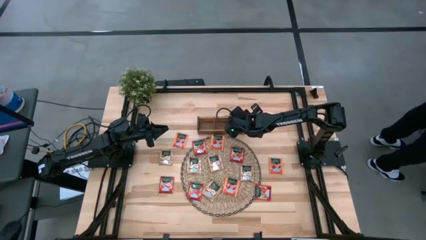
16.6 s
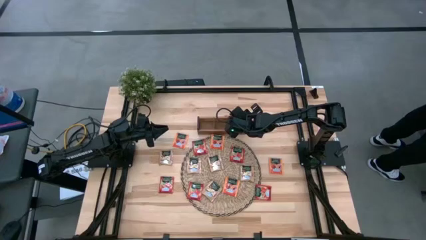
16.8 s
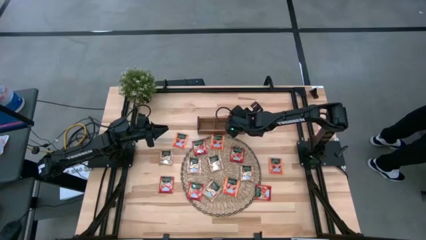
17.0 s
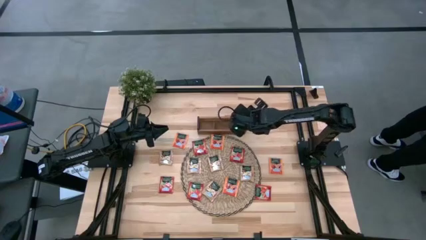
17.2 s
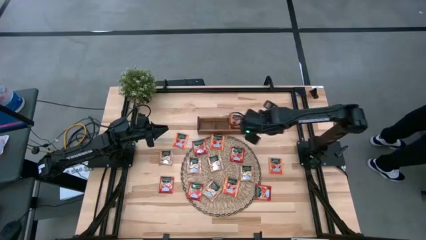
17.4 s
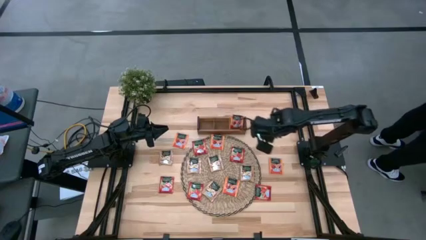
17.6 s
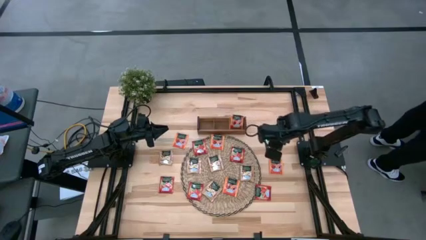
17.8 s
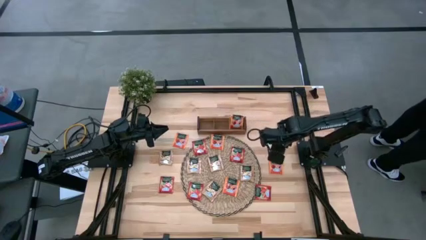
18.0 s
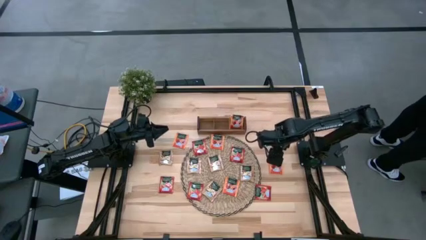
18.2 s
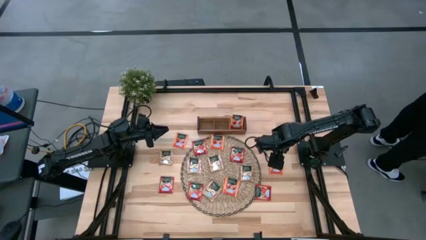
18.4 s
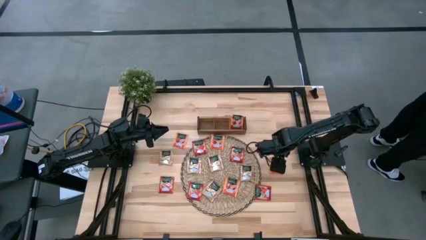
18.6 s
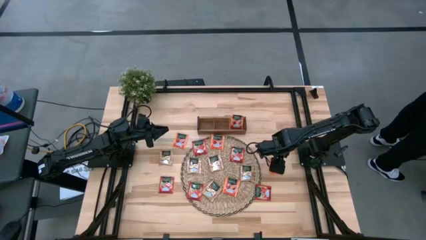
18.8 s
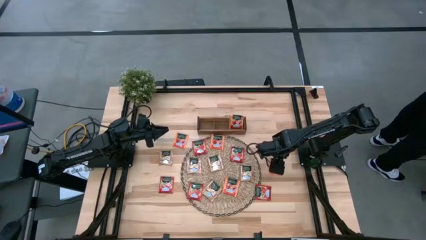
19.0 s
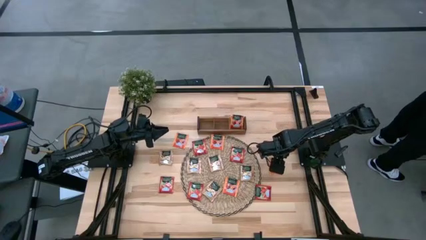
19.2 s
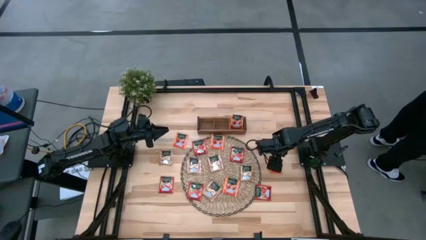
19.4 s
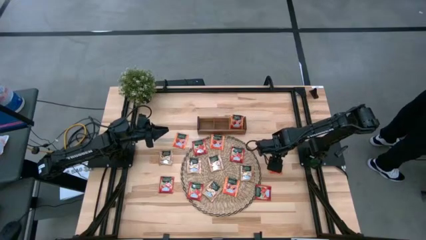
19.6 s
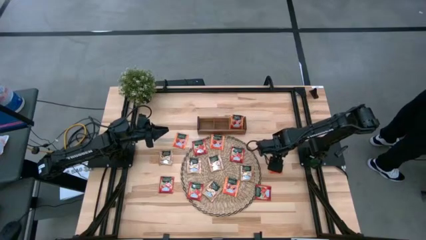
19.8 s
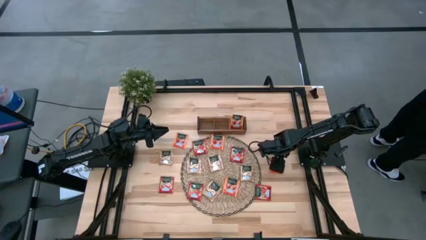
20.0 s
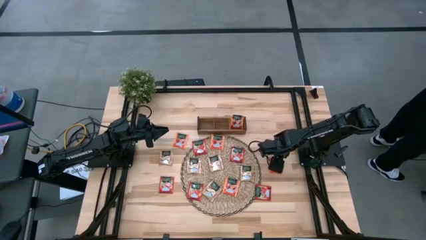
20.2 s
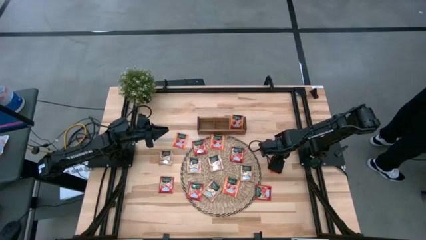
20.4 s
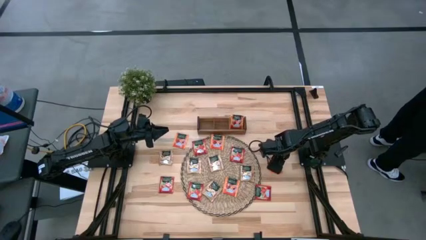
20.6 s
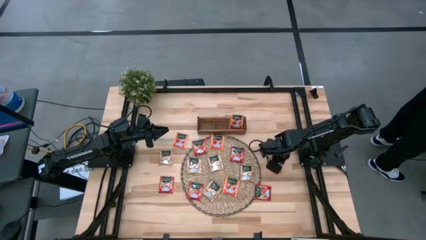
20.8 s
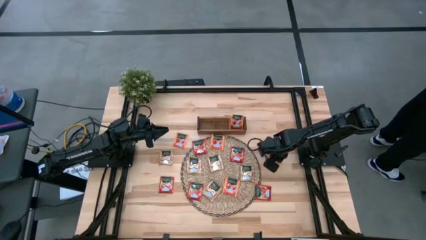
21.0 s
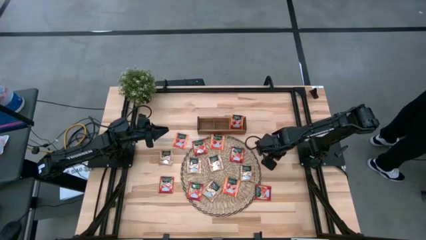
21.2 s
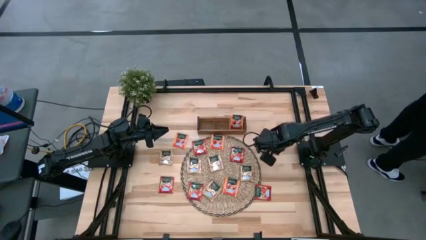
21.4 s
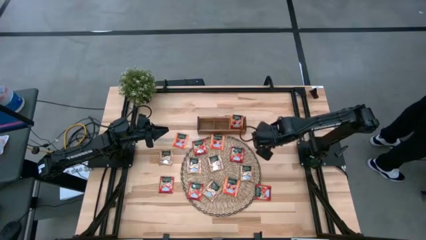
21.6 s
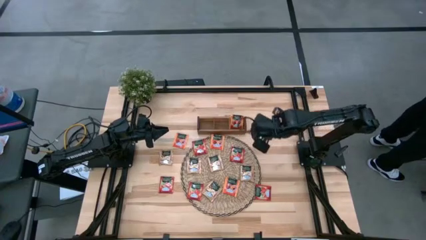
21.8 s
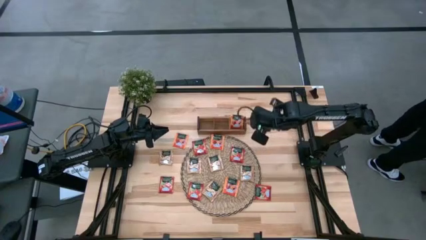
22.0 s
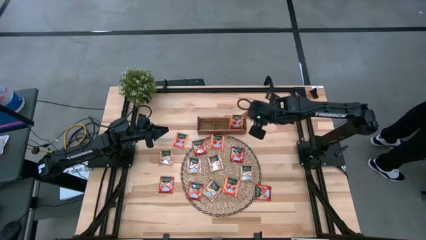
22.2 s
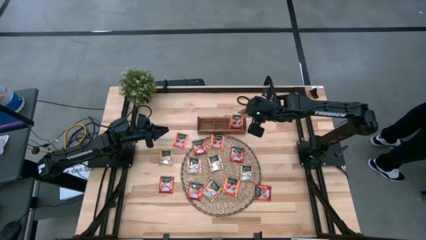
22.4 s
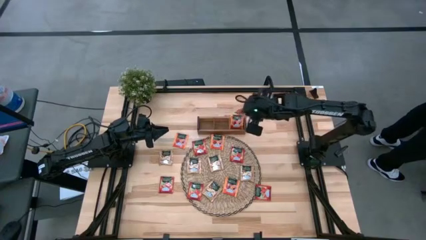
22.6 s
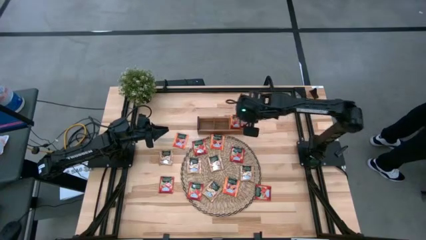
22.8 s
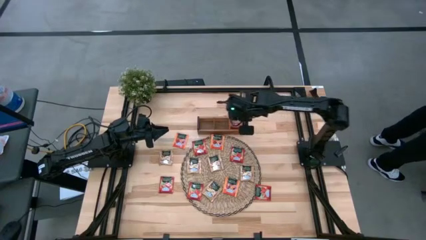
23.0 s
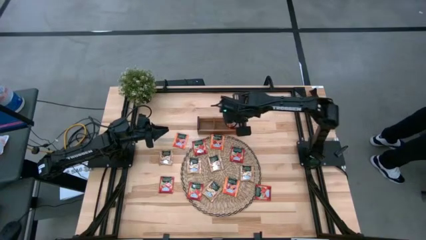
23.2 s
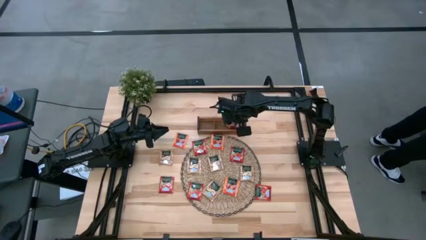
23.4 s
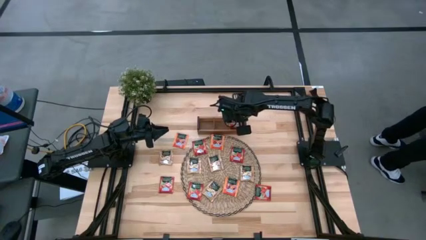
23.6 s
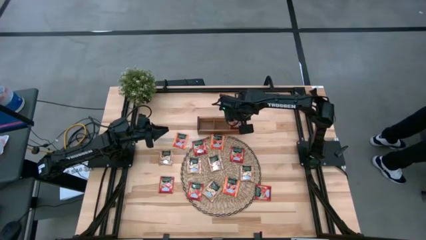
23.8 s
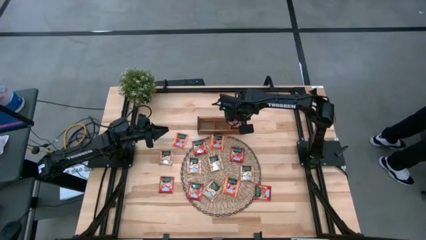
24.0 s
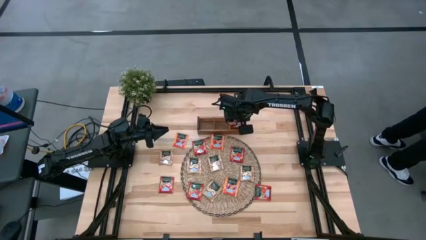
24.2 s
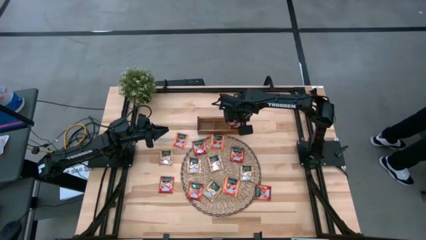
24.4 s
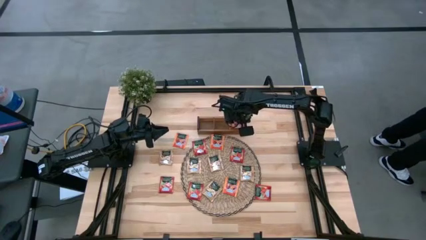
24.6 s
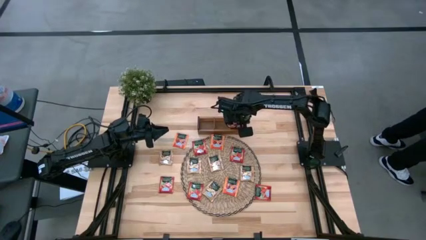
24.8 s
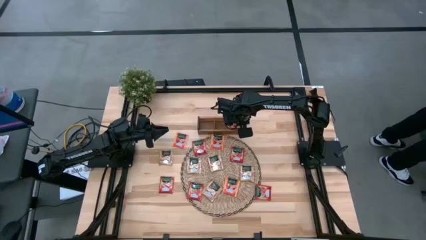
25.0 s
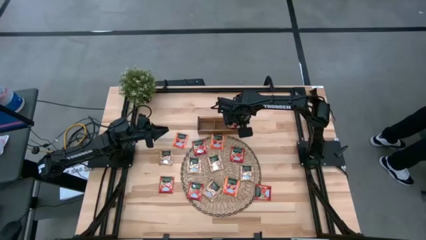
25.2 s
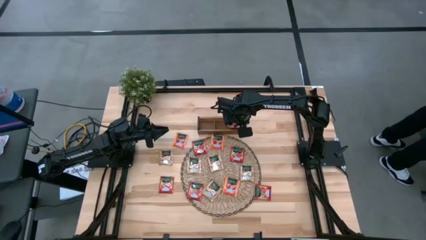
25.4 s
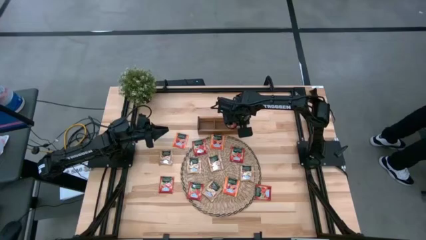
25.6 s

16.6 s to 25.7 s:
Task: Pick & Place Tea
Put the orange tea bag to the right of the wooden organizer

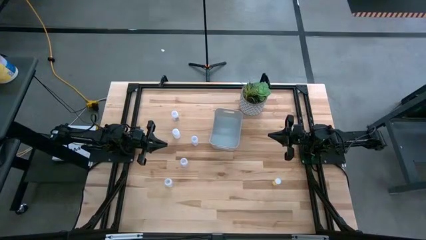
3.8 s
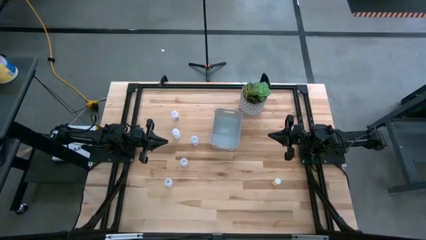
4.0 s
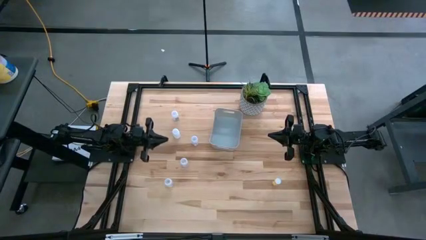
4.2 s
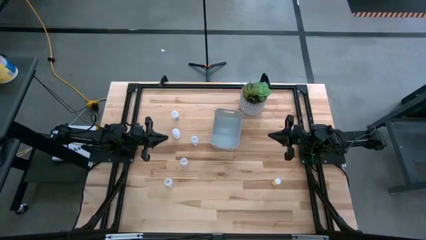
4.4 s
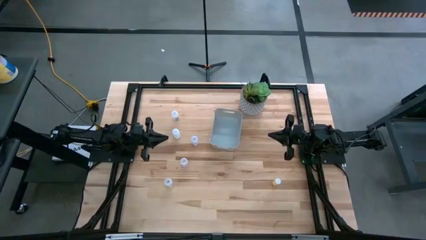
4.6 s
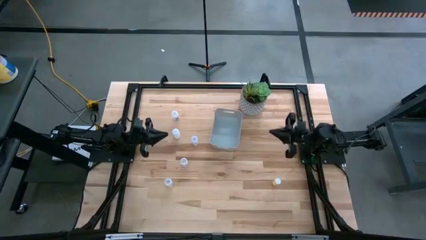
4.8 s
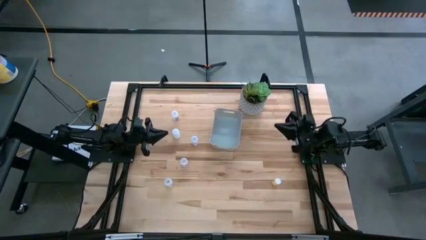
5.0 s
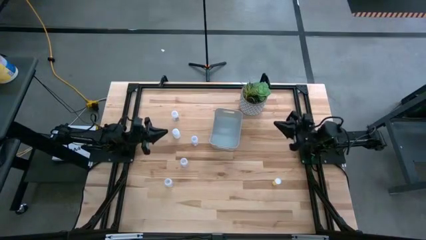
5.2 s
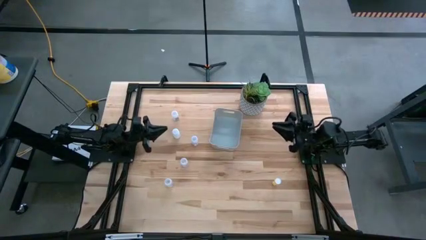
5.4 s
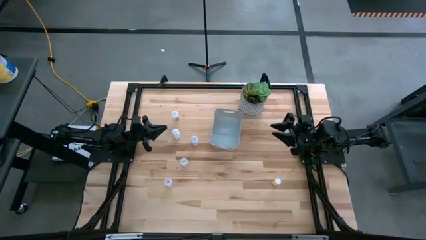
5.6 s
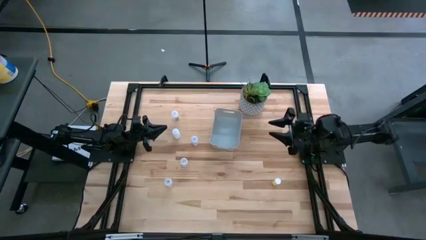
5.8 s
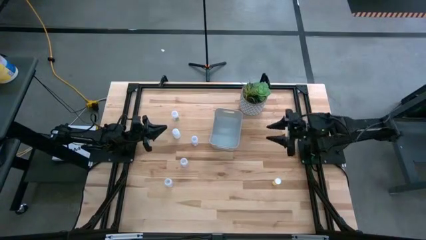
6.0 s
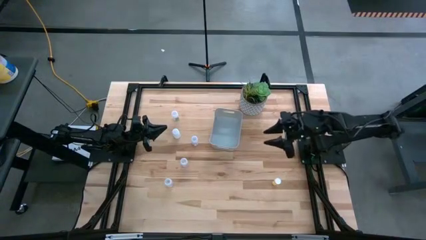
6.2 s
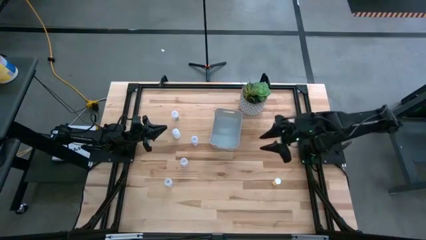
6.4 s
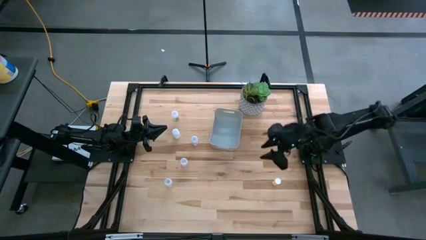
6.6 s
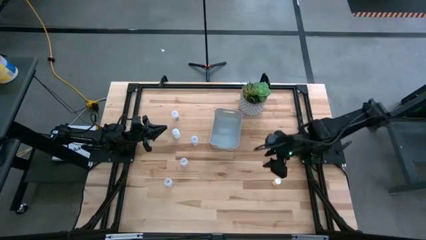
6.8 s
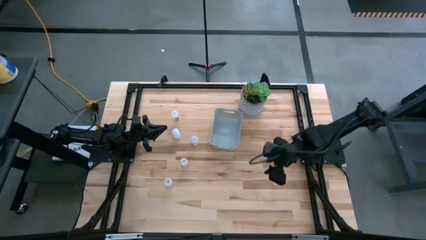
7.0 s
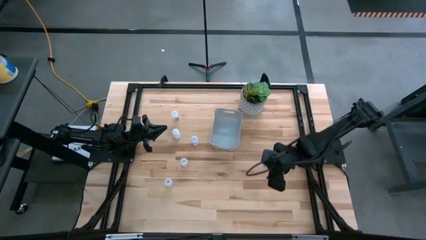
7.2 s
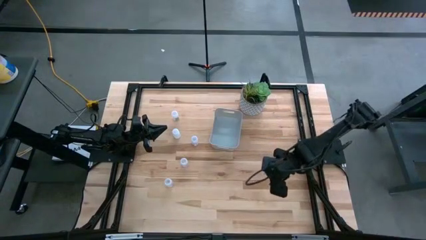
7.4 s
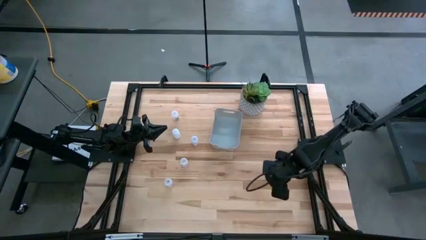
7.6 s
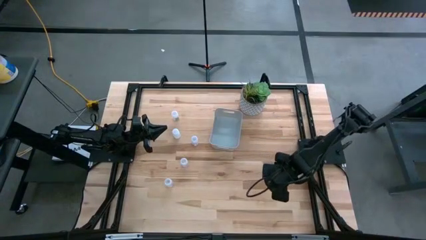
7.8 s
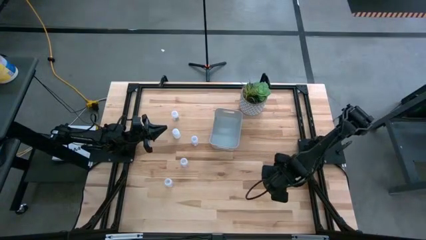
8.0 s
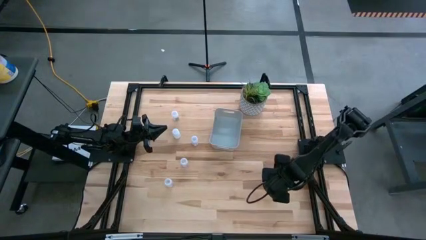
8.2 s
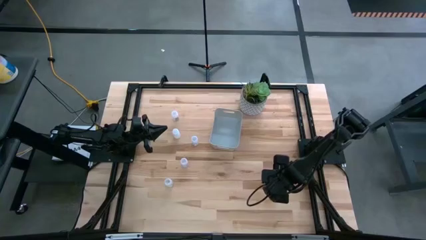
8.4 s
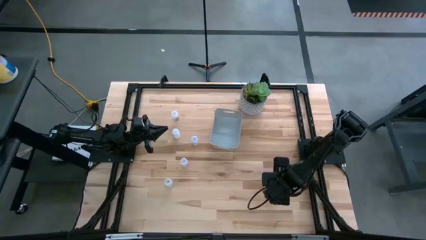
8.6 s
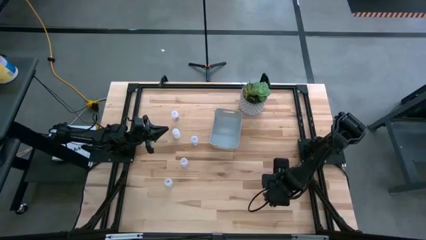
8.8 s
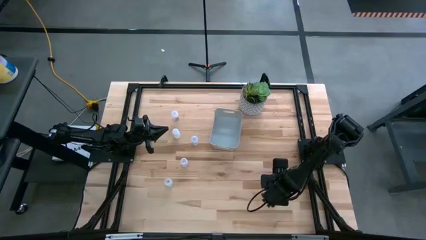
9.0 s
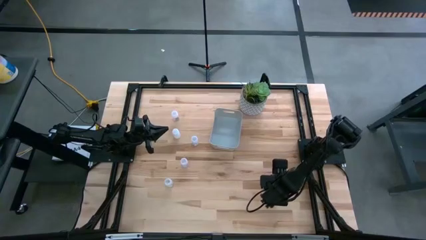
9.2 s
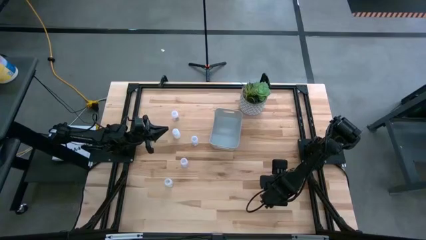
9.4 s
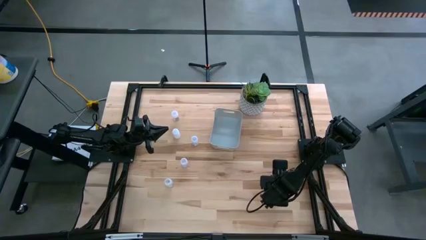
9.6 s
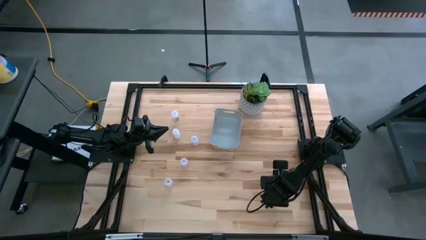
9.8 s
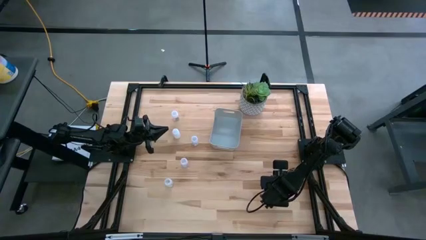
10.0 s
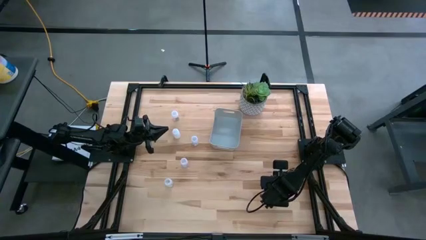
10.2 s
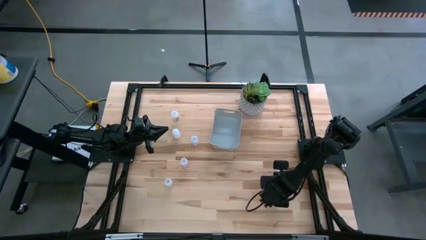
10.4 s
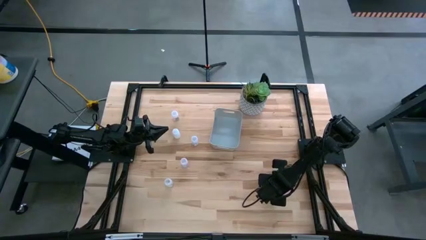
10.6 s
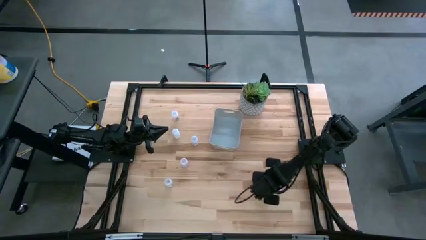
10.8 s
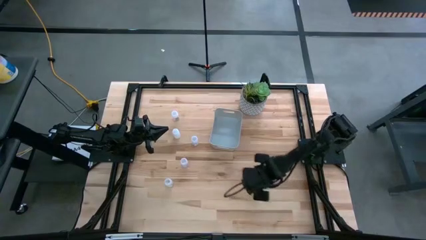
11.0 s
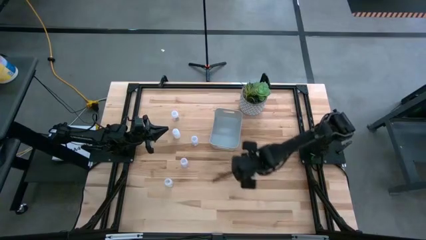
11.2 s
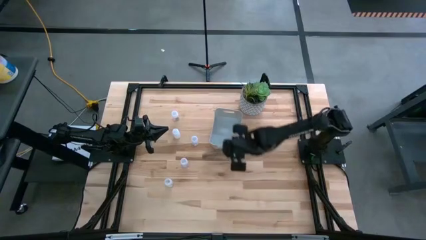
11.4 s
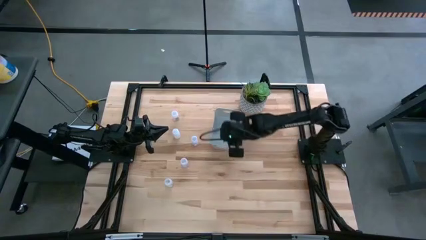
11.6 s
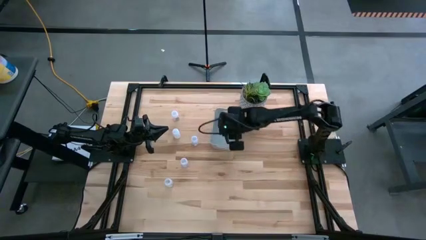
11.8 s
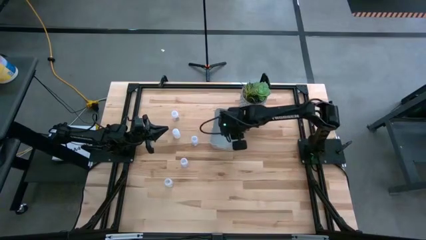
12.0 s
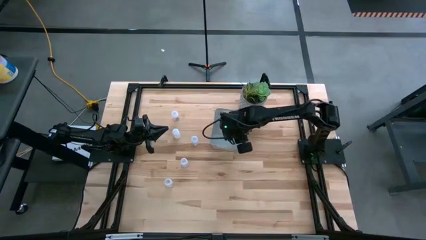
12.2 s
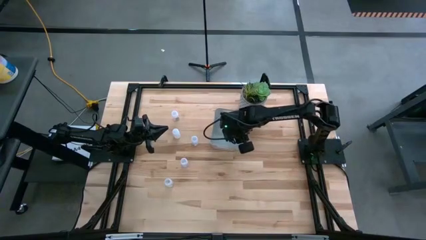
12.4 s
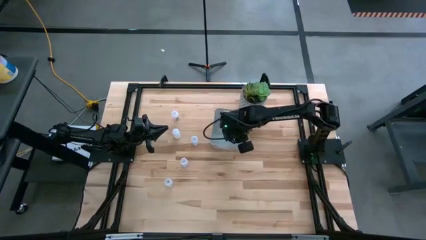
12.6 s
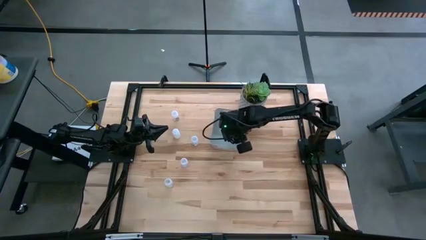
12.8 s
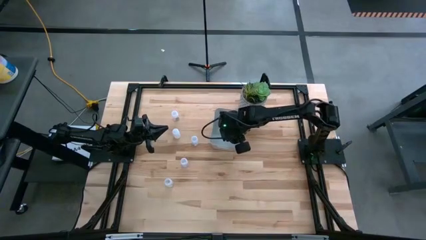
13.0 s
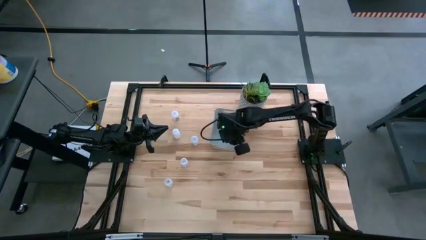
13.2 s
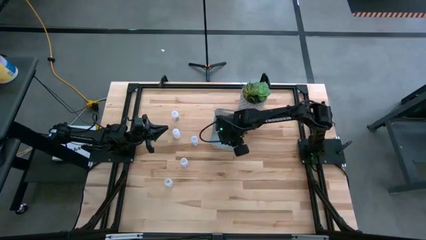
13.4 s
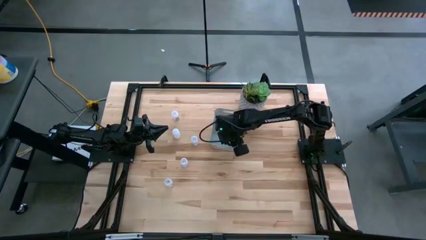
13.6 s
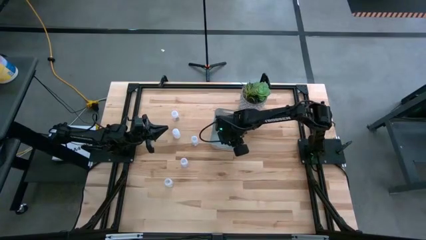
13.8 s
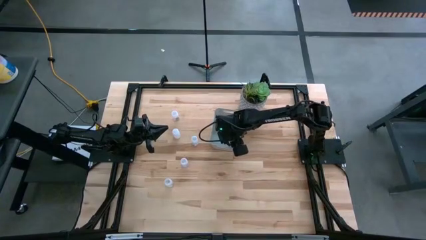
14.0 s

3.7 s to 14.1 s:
Task: Pick and place pill bottles into a basket
Put the yellow pill bottle into the white bin
